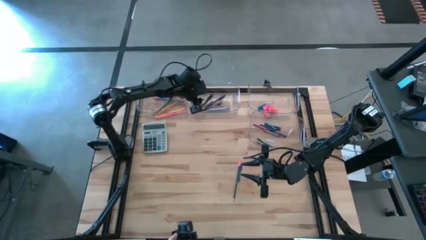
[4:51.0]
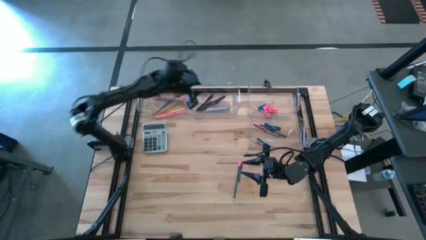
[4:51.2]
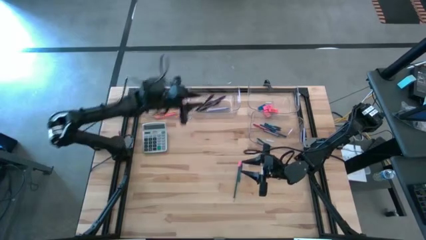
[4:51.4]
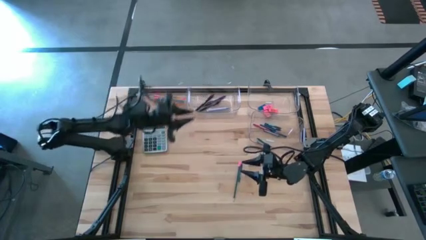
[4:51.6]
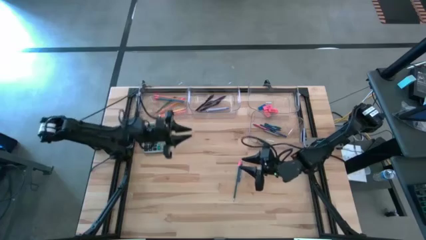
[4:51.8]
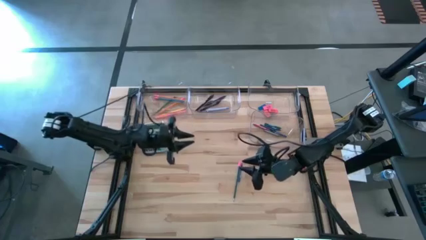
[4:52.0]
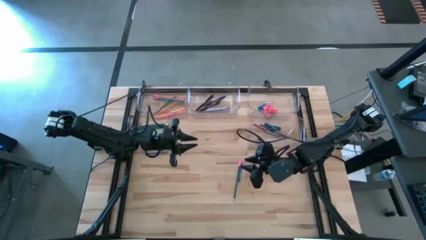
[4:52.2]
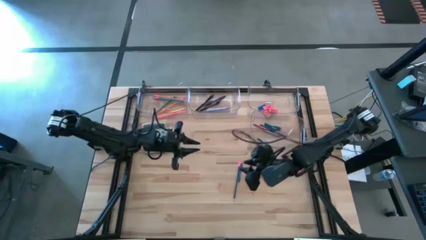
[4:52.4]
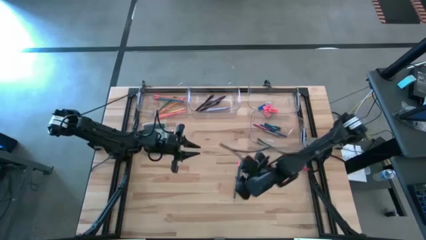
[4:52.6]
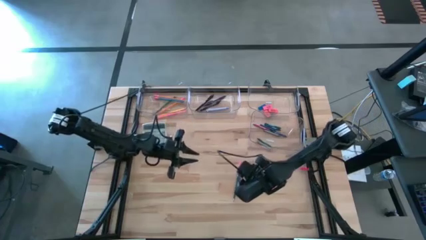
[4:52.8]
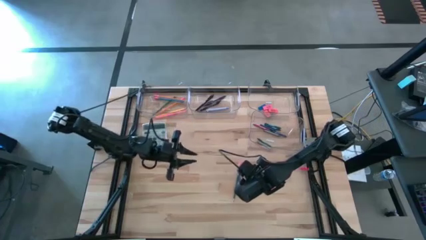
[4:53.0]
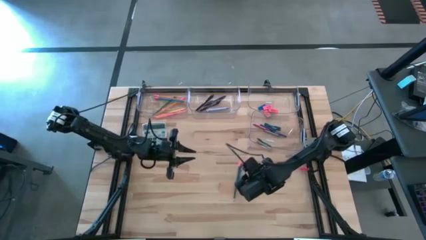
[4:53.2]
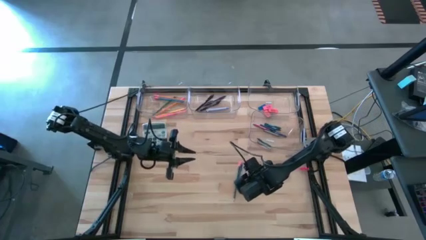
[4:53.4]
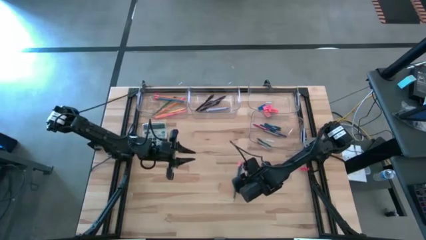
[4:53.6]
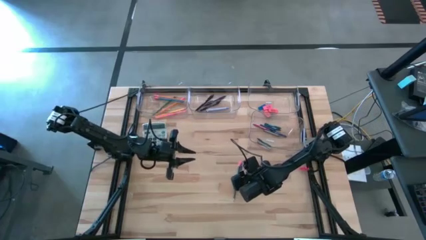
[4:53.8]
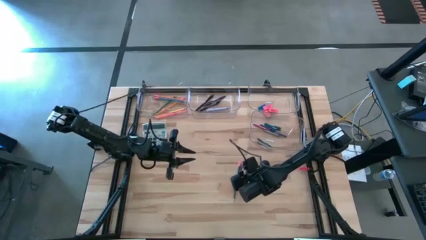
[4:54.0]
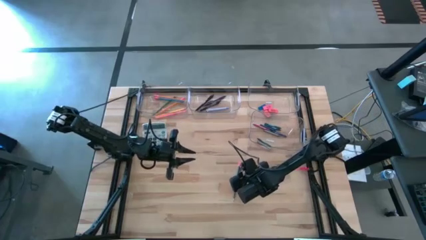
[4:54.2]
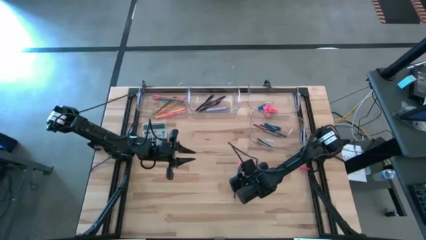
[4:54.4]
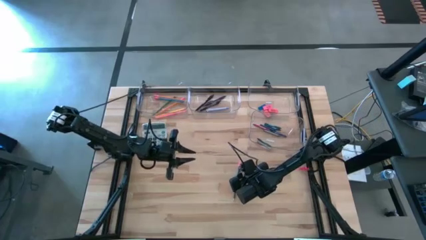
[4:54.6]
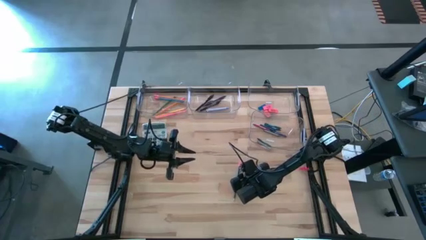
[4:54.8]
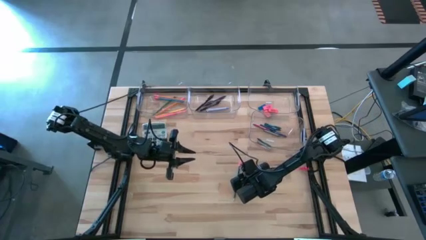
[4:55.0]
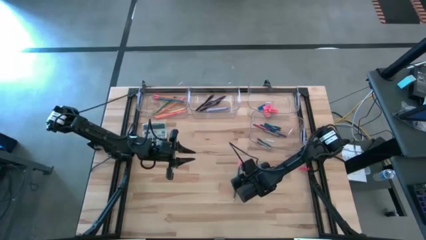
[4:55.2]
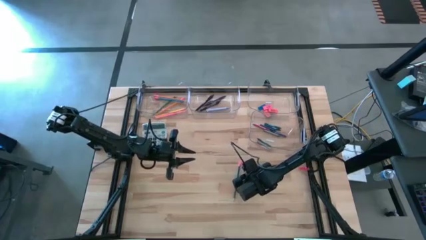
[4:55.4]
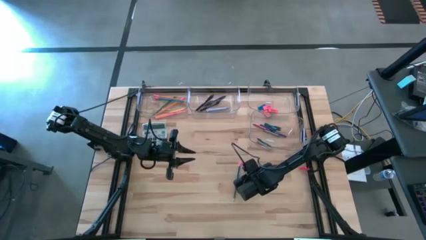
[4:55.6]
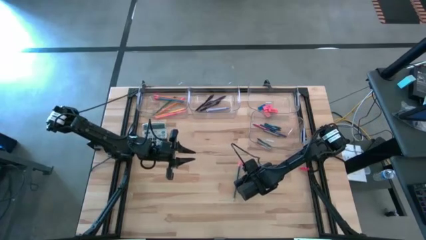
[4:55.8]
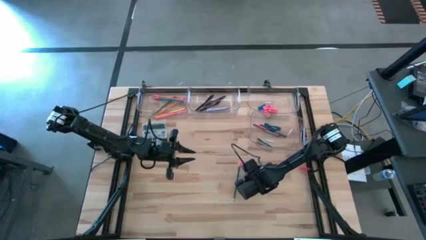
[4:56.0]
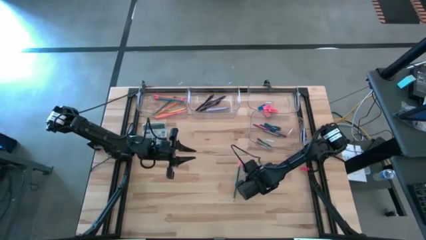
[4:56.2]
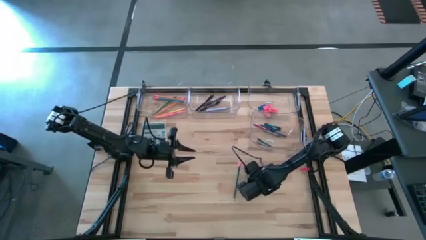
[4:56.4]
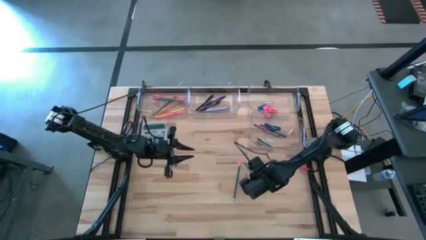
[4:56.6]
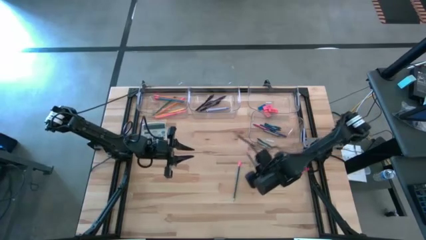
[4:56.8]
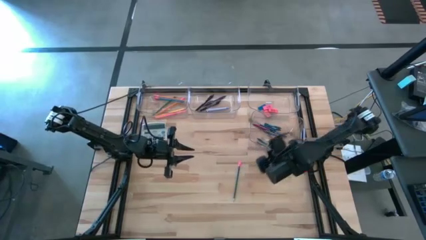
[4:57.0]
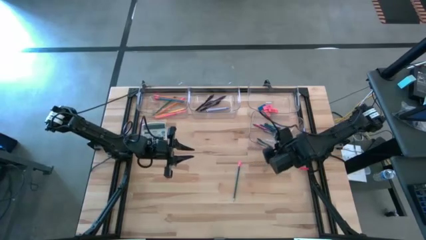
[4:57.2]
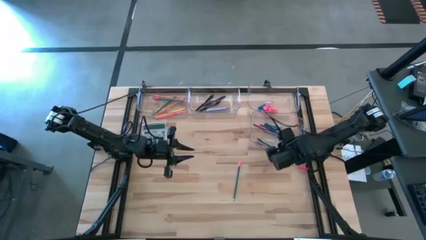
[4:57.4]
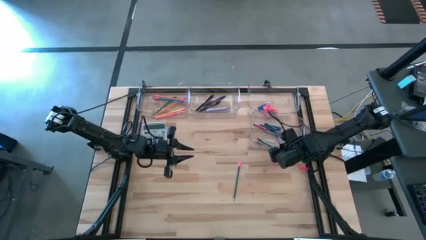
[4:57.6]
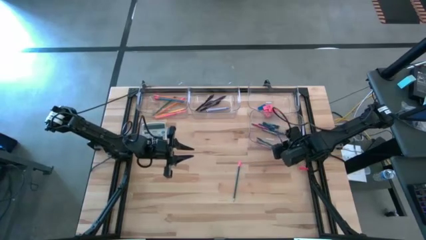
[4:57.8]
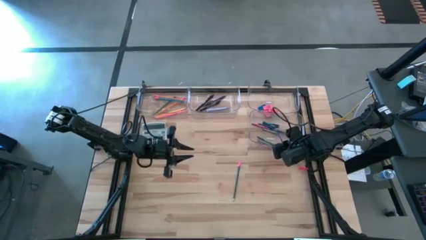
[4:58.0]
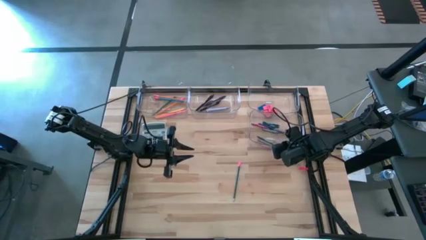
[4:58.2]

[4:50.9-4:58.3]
Task: Sort crayons/erasers/pens/pencils in bins
Put the blue crayon into the bottom transparent bin

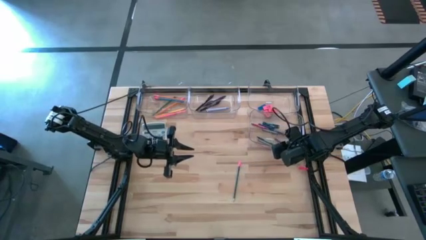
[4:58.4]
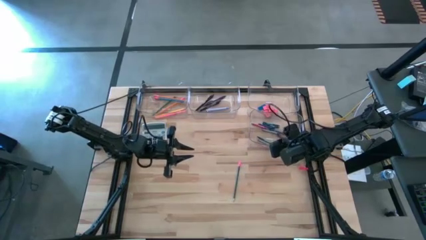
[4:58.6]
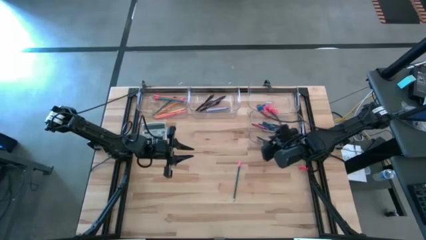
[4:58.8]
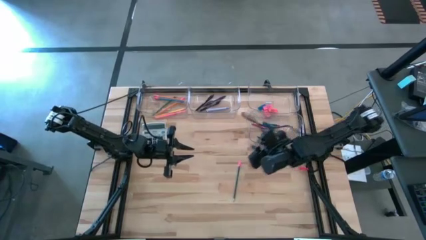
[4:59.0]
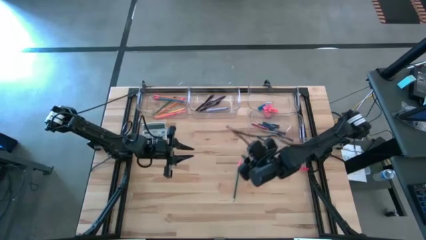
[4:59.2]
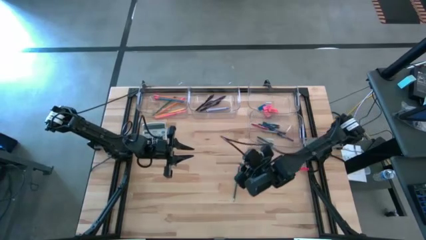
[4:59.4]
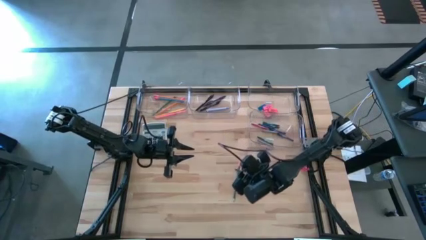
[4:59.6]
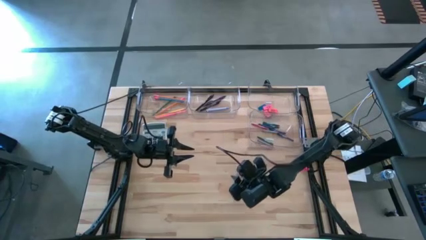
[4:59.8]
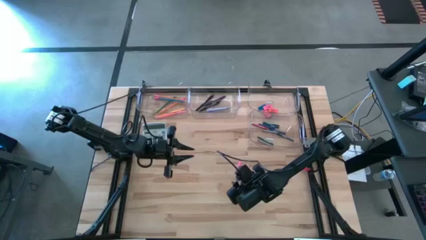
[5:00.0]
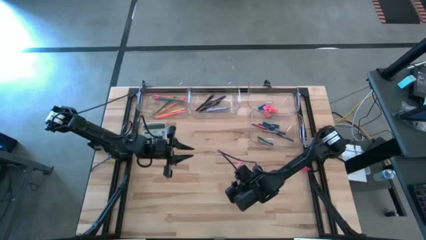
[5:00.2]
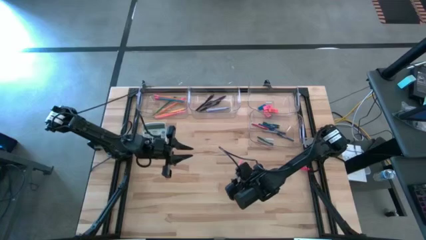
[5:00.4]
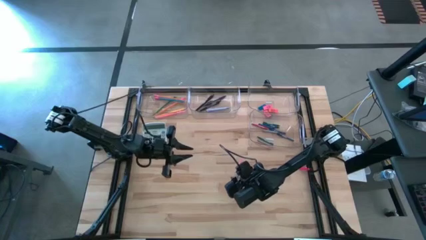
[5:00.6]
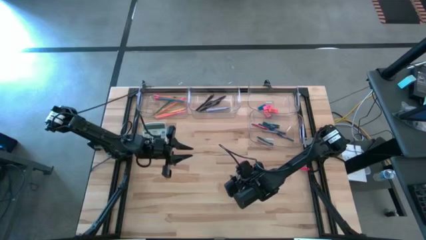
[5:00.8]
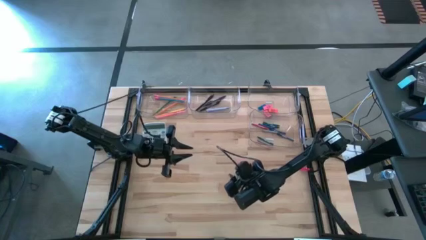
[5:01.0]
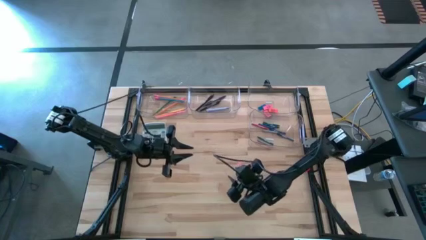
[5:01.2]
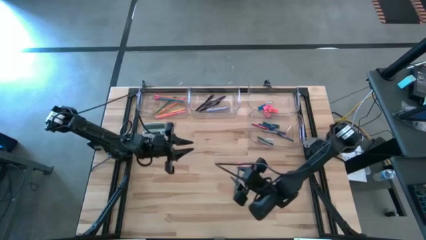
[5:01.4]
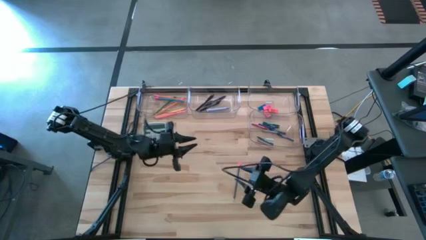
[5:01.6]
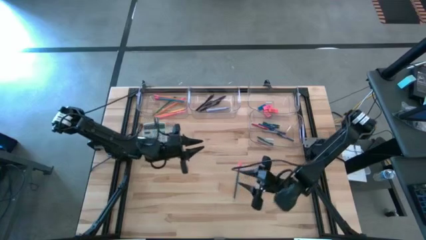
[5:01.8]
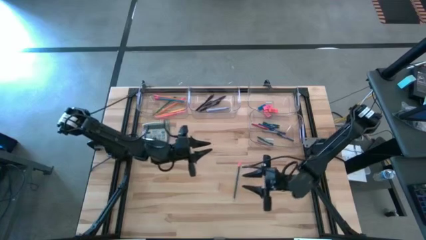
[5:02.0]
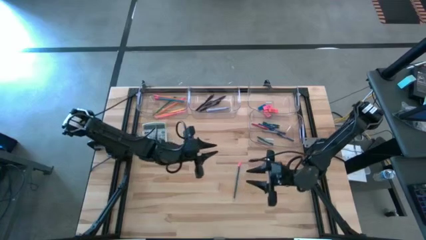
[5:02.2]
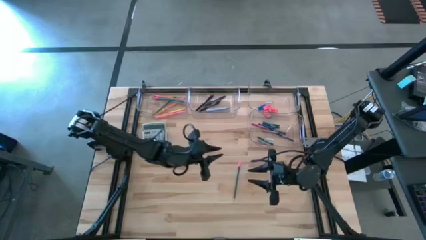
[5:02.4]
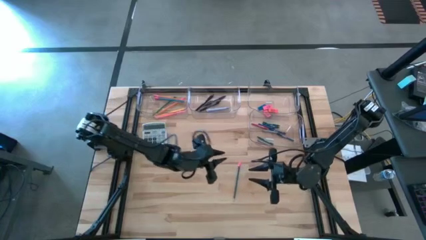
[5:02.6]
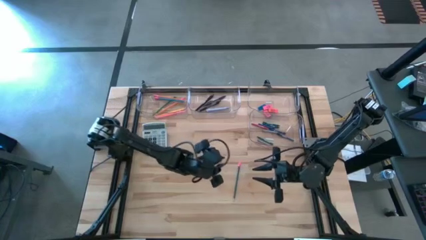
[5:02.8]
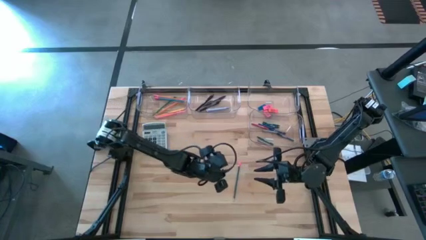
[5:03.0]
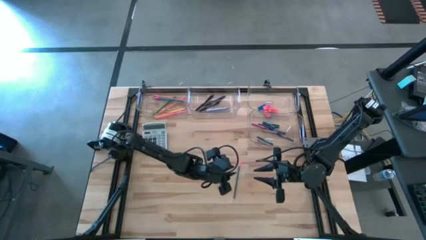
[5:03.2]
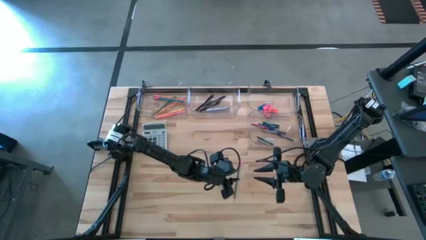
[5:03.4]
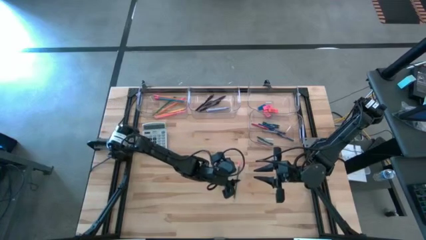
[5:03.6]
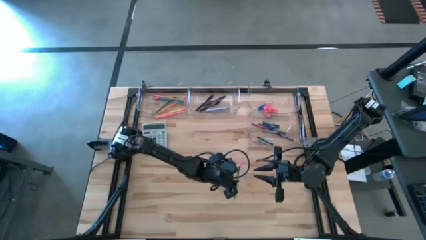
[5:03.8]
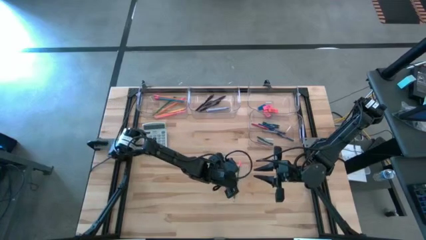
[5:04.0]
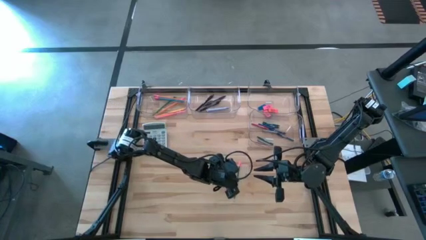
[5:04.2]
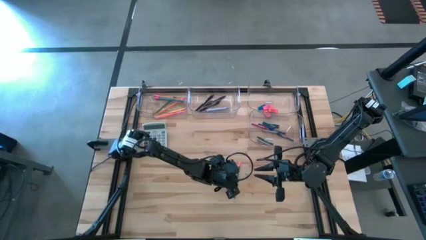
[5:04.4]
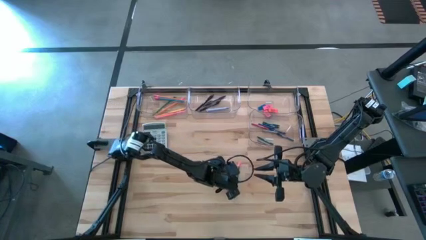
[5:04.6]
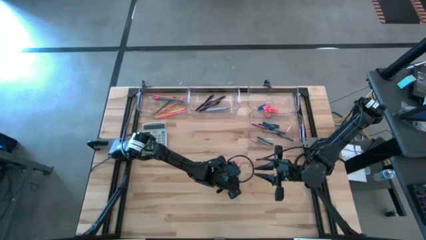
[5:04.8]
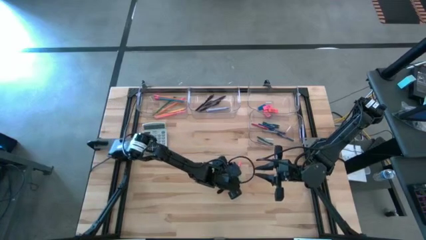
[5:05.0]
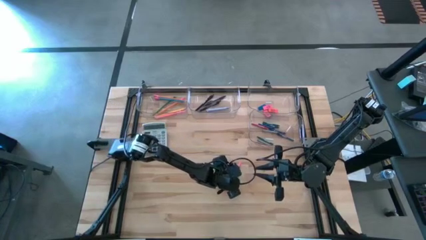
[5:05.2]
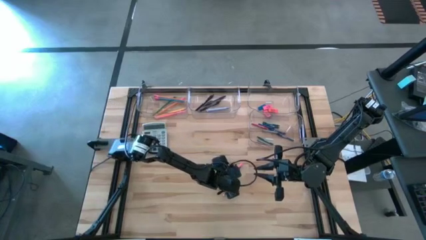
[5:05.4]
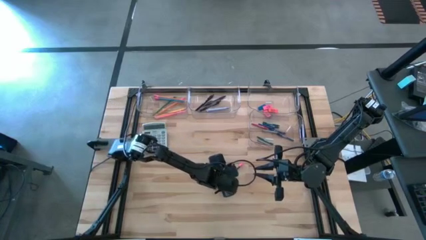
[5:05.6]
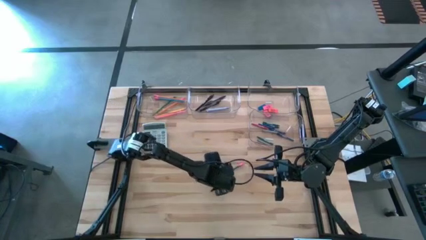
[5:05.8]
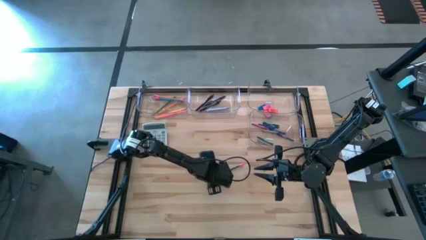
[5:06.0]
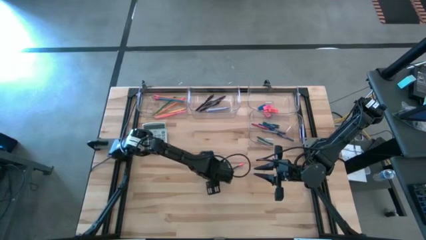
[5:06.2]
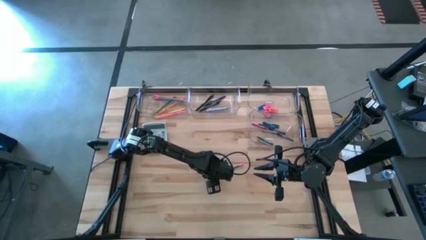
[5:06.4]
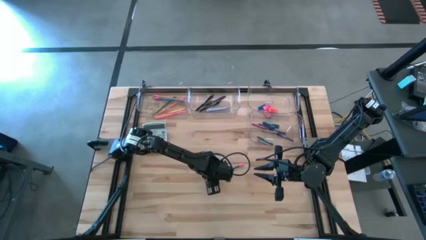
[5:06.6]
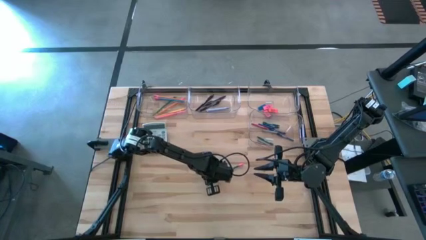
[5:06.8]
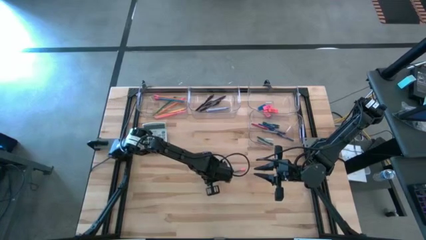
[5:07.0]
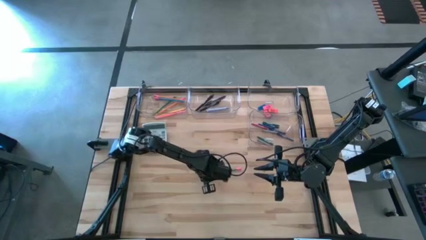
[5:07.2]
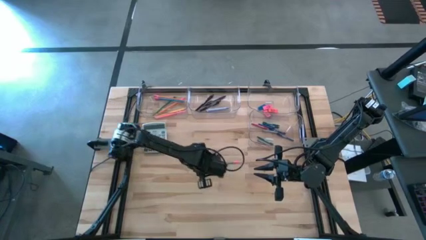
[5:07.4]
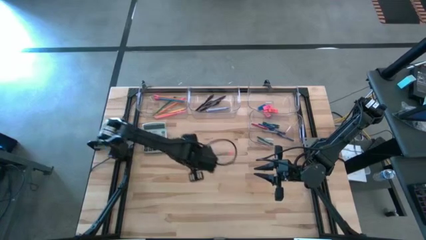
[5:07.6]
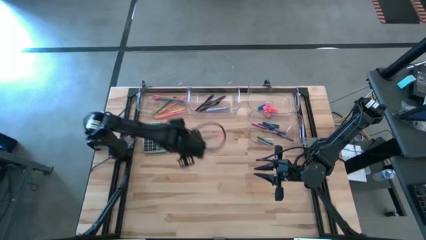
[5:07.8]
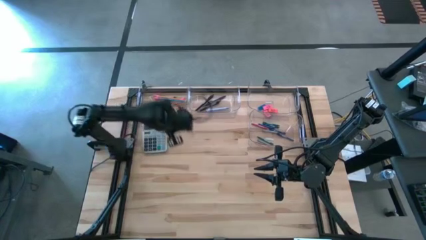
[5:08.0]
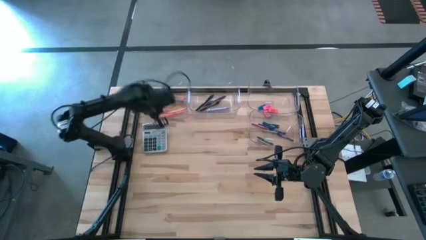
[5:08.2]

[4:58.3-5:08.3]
Put the green pencil into the top left transparent bin
